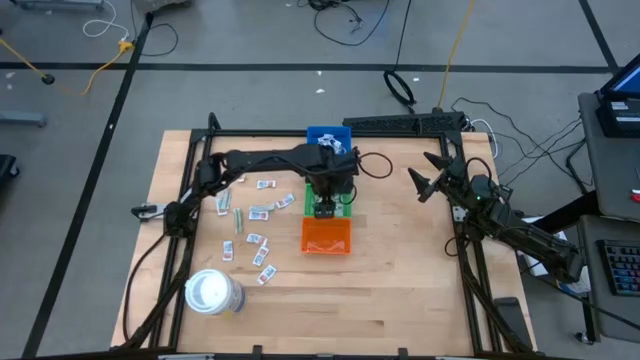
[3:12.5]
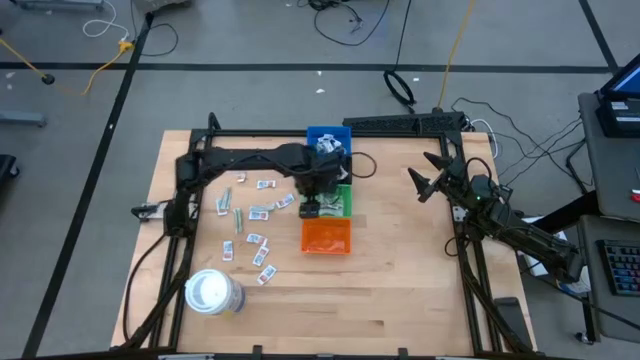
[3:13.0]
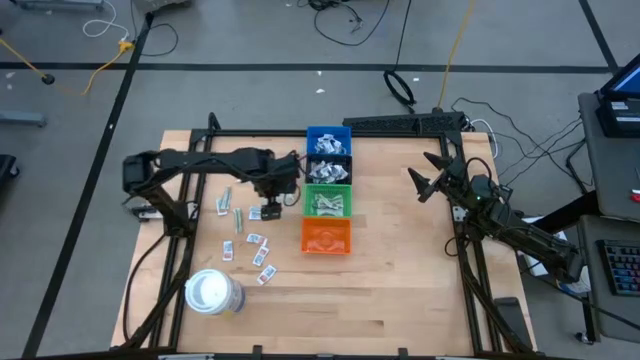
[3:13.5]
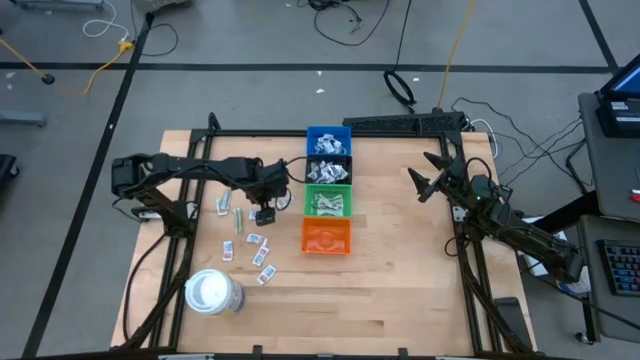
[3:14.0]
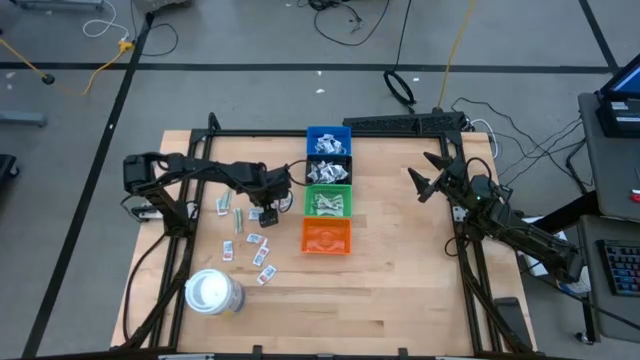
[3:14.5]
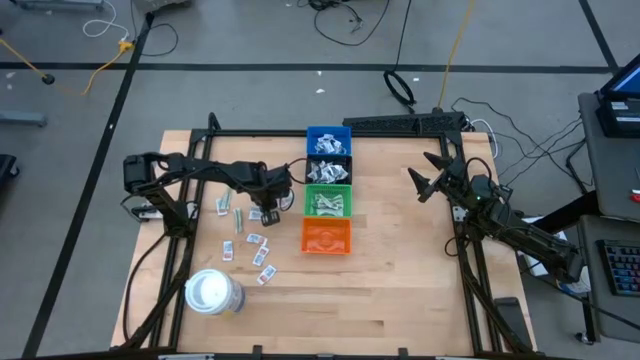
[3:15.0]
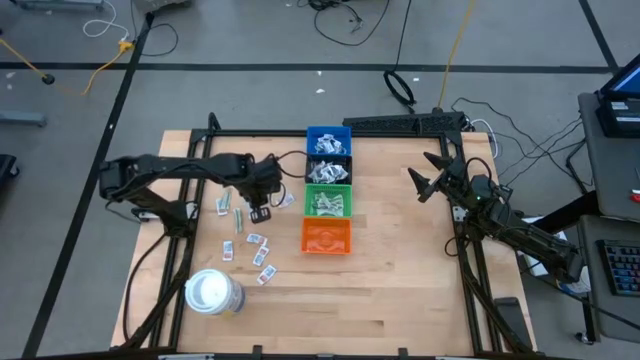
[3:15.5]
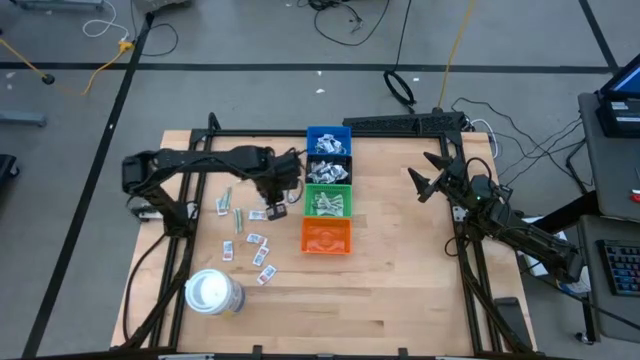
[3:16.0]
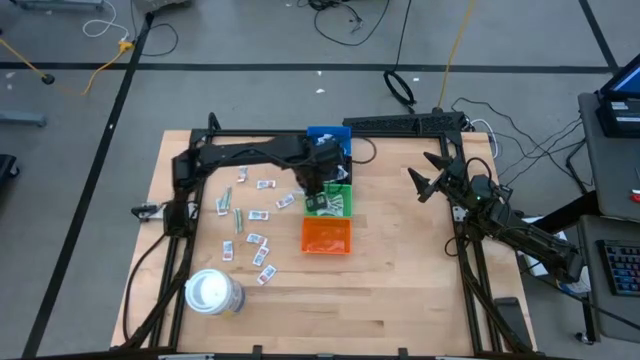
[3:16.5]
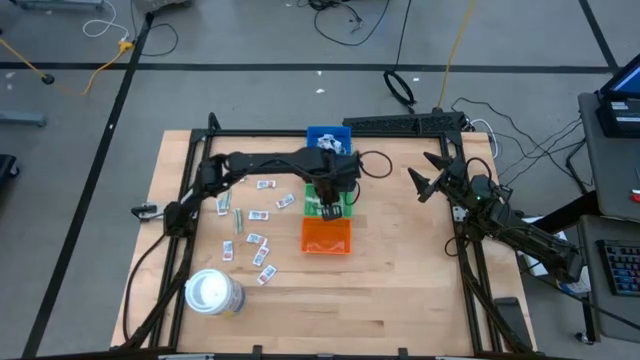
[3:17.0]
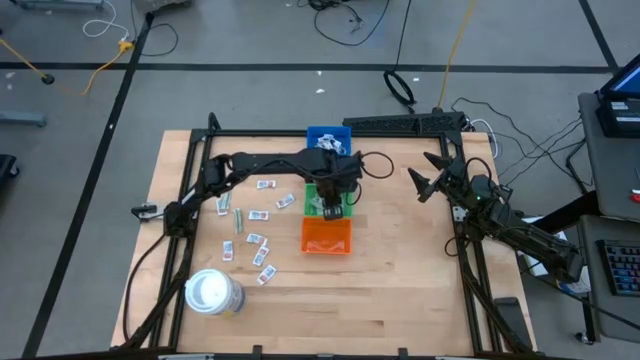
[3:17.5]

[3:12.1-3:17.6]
Task: Pick & Place First Aid Supplies
Put the green bandage into the green bin

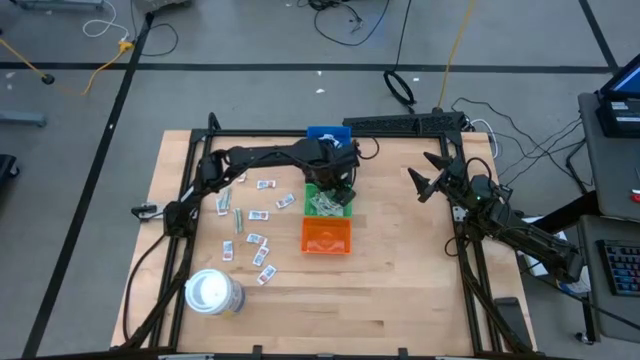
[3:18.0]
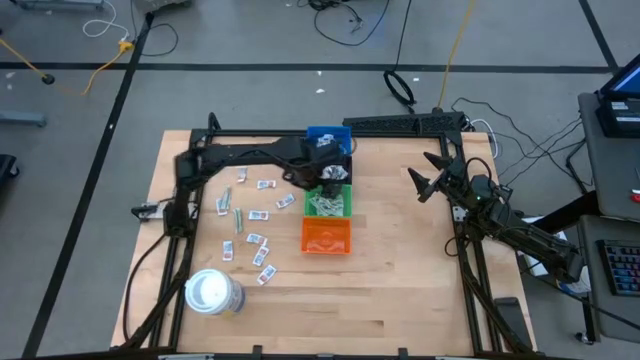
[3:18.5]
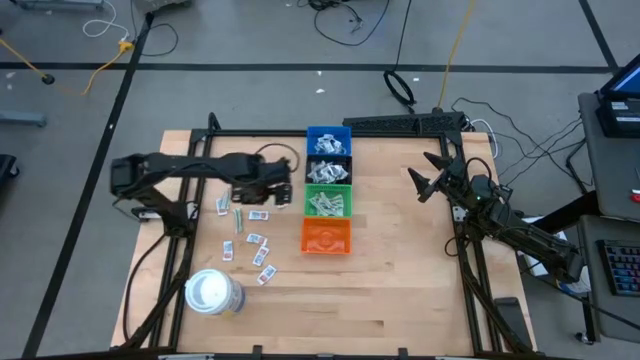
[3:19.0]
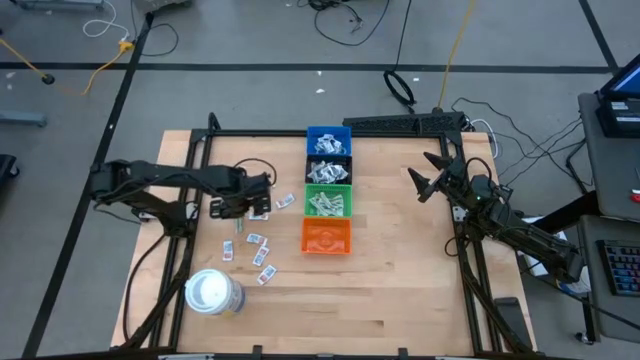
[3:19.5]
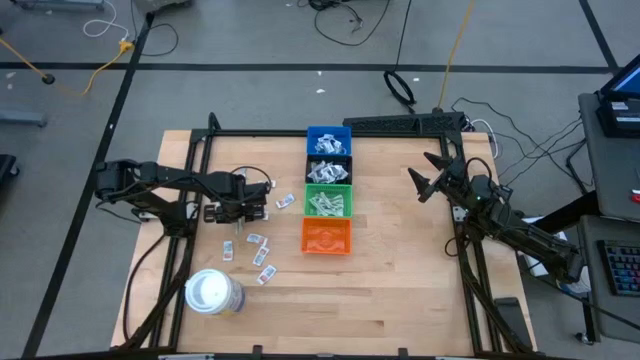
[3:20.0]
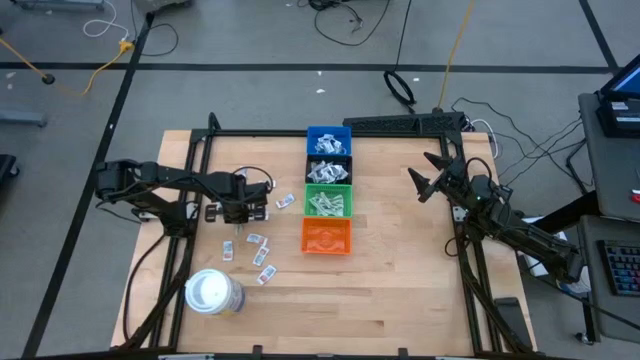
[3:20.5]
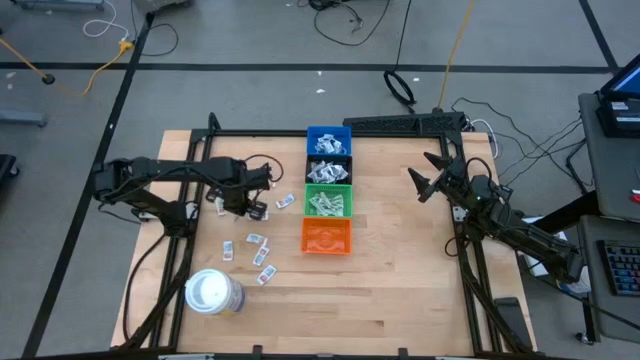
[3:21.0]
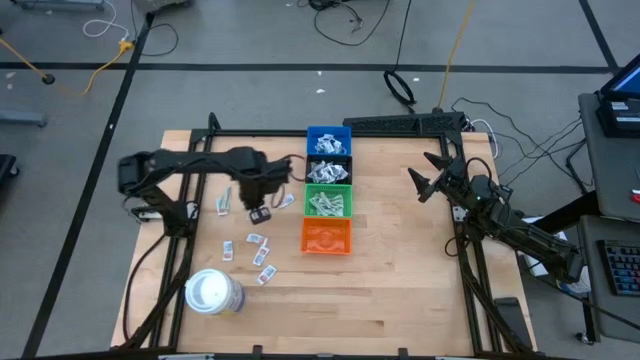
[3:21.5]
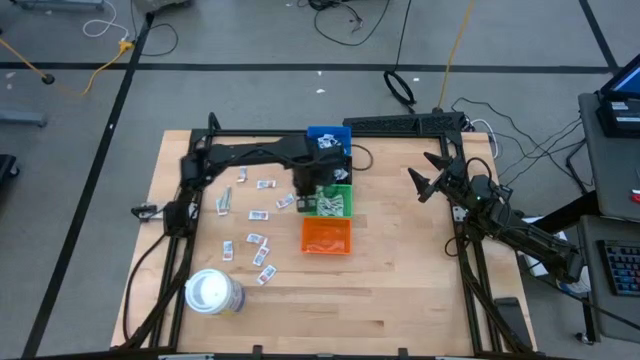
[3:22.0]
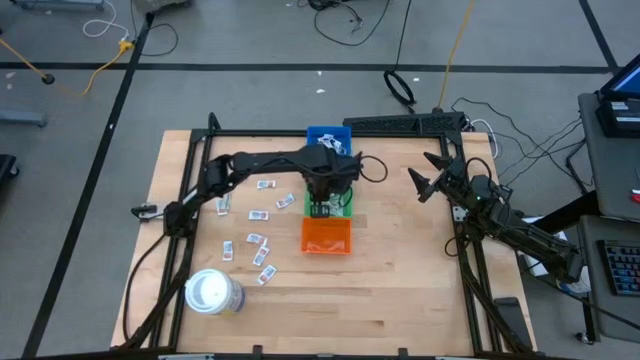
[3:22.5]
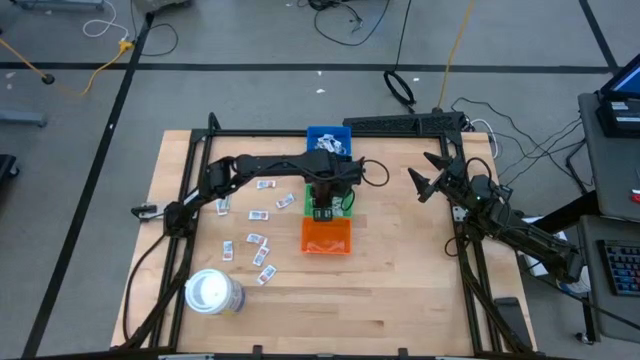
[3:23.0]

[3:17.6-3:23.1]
Put the green bandage into the green bin

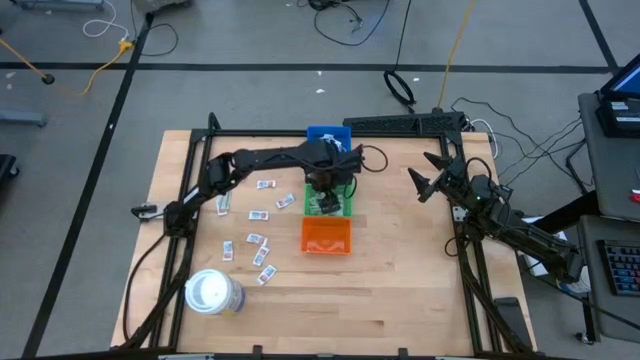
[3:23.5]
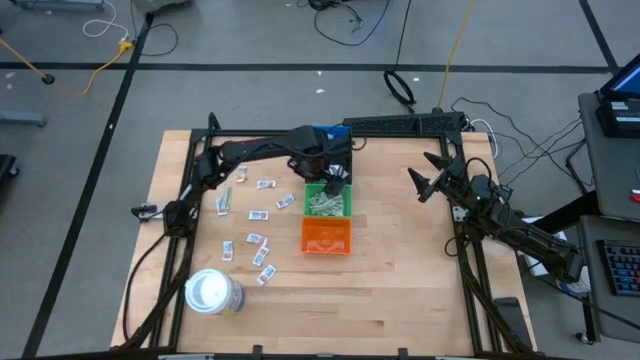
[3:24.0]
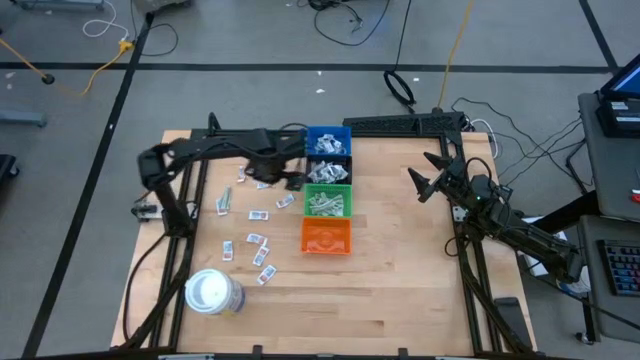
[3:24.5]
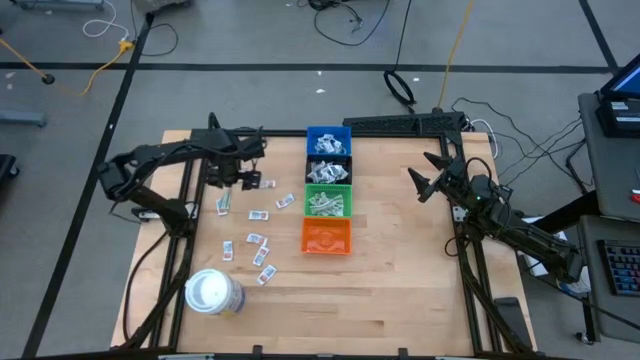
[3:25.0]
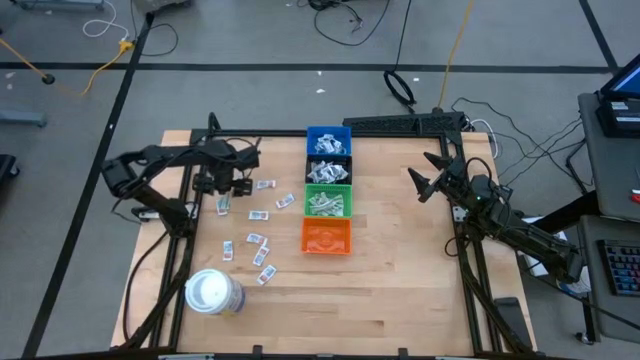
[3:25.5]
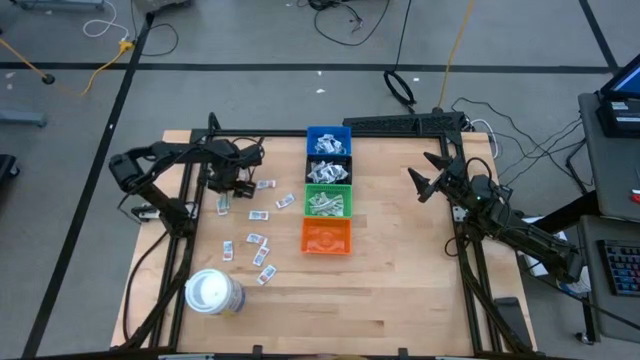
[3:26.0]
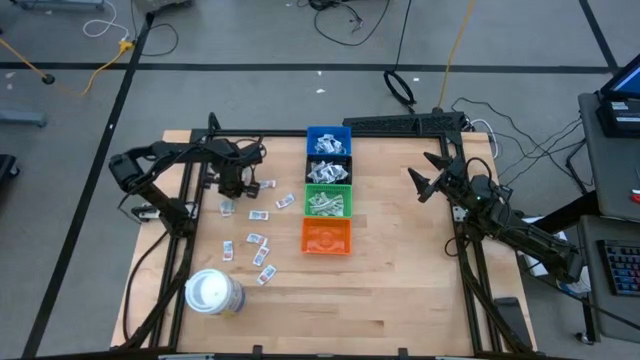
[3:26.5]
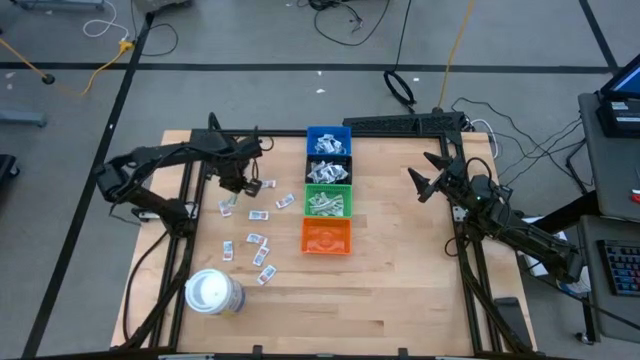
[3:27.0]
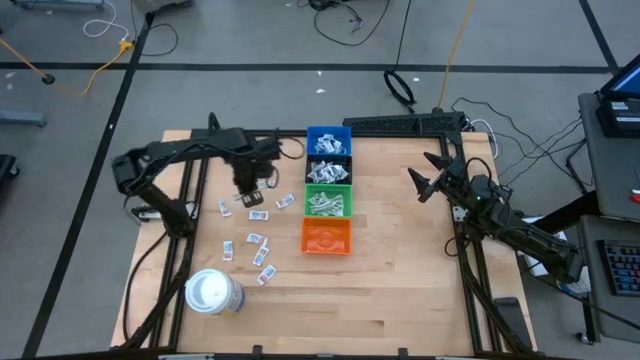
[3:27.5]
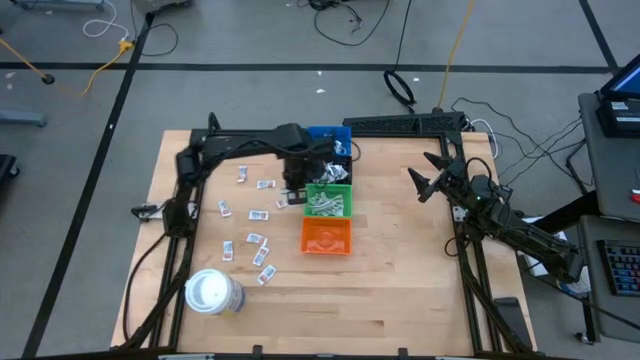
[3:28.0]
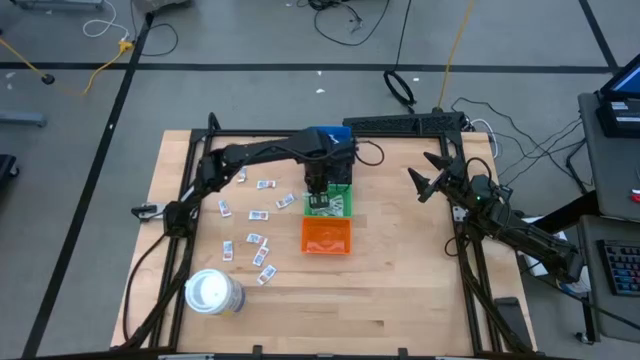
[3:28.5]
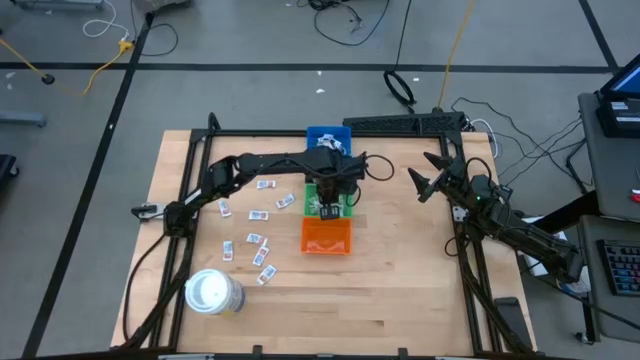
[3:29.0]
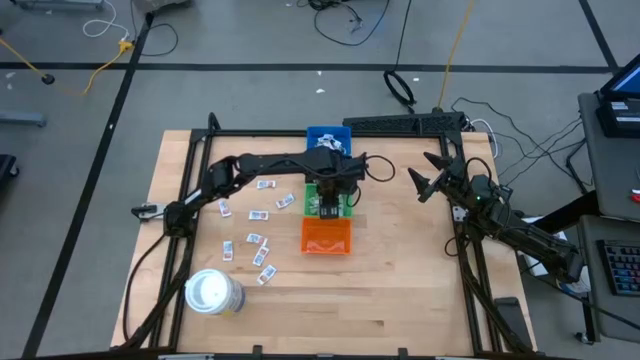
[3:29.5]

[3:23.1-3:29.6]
Put the green bandage into the green bin

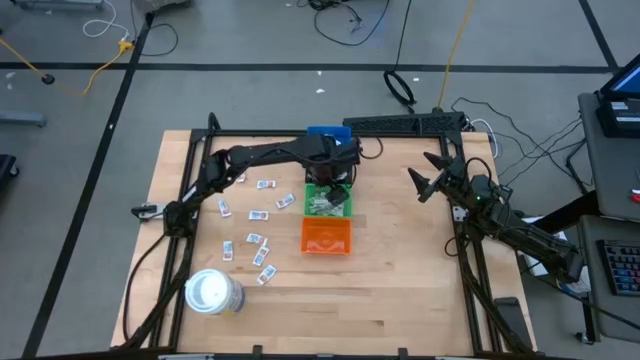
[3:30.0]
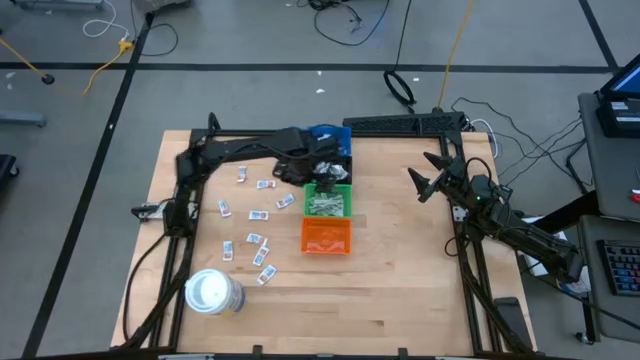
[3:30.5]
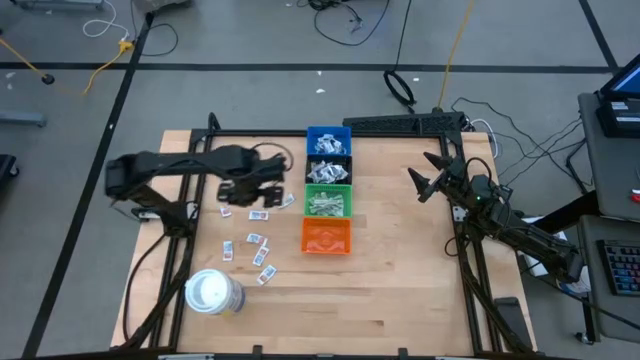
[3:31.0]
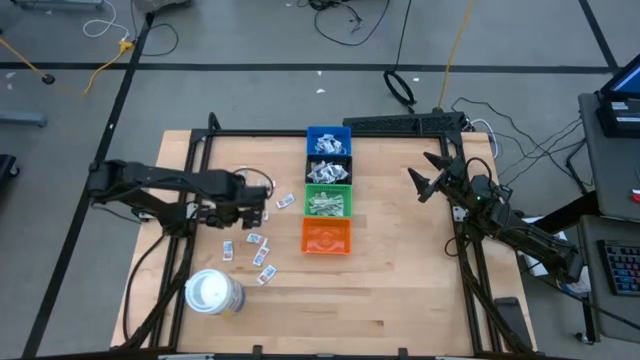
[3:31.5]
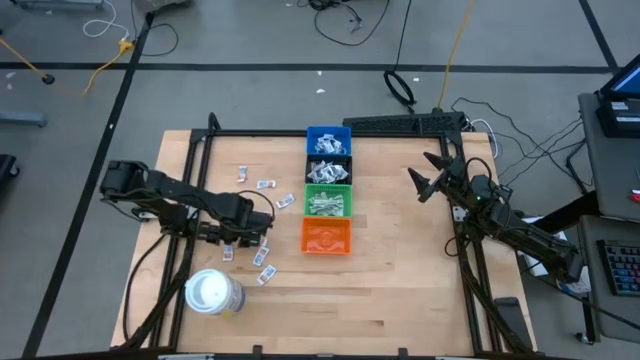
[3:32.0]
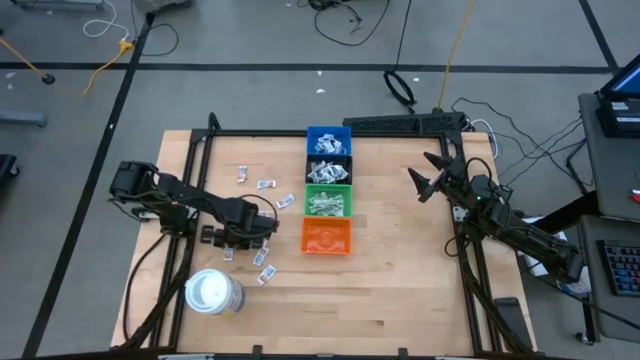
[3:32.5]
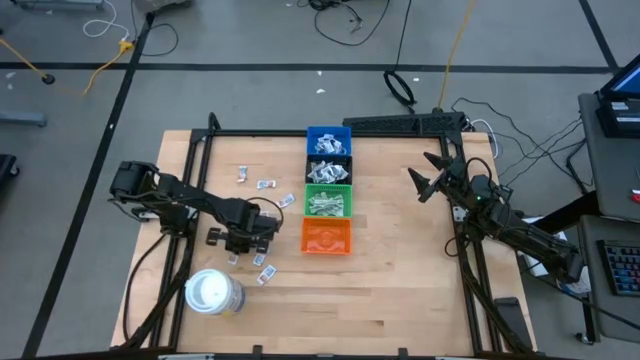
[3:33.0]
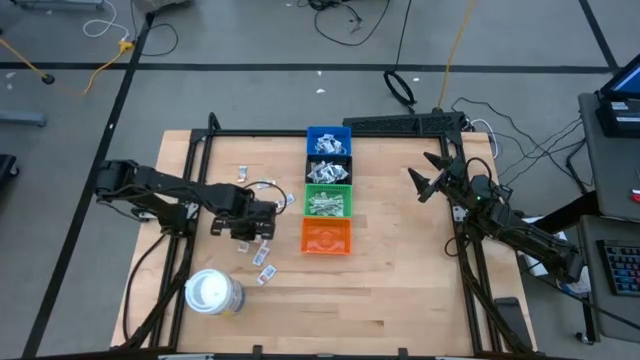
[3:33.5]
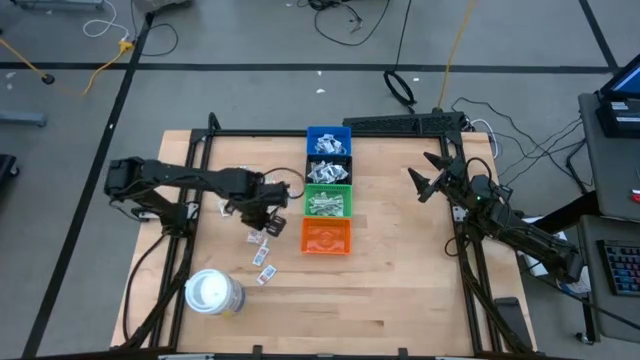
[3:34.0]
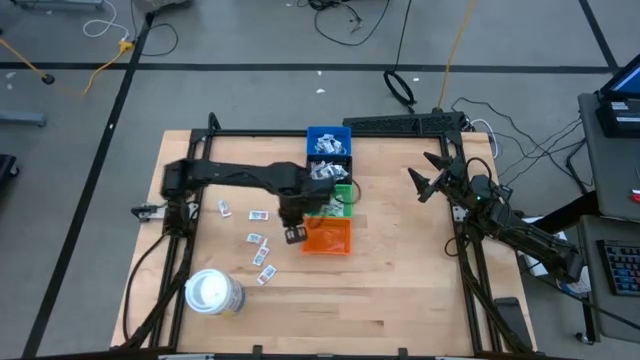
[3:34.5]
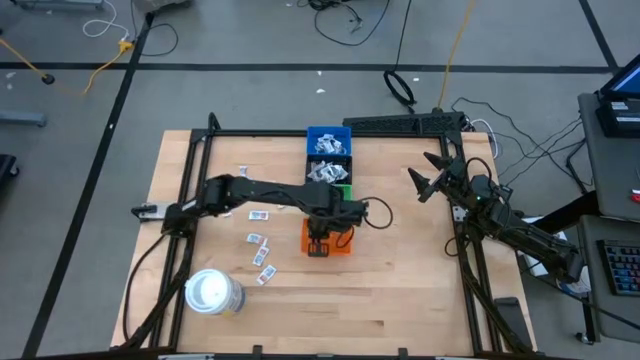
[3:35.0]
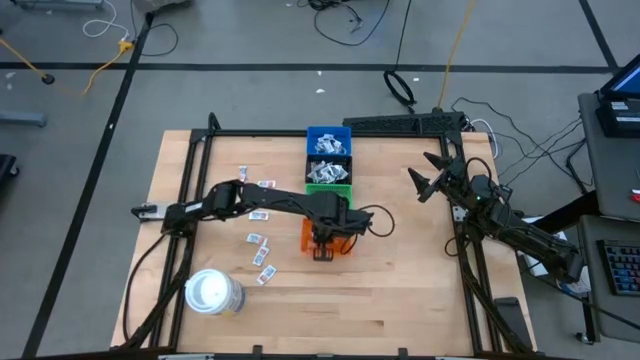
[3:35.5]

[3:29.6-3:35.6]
Put the orange ointment pack into the orange bin
